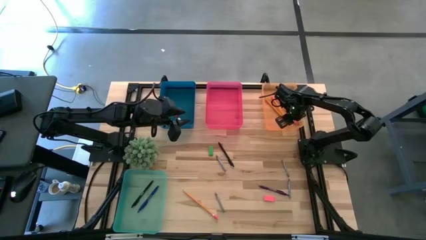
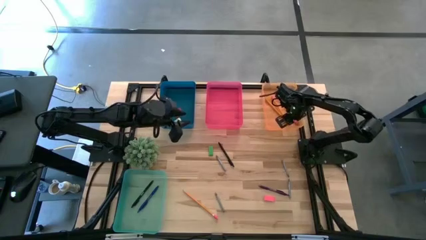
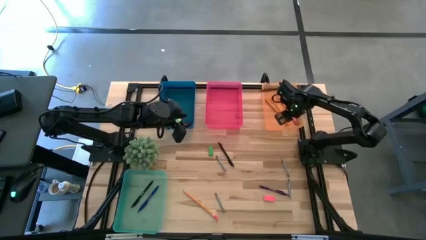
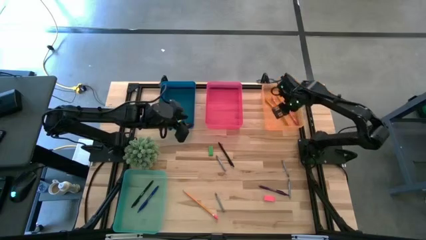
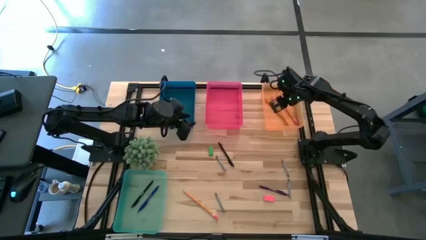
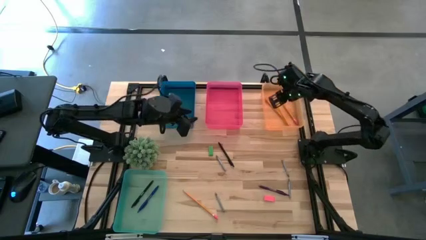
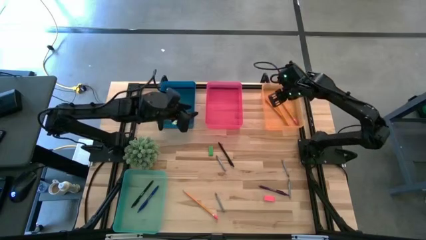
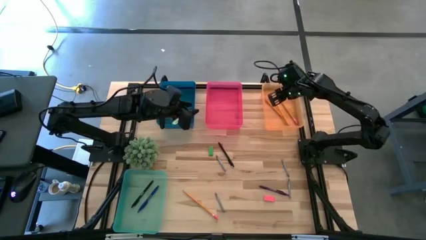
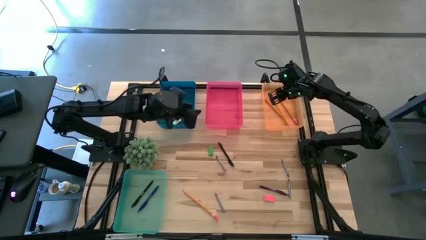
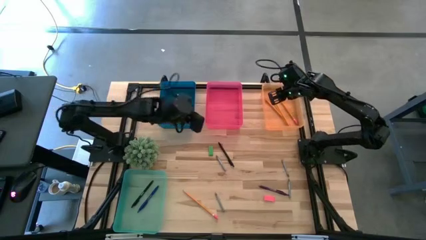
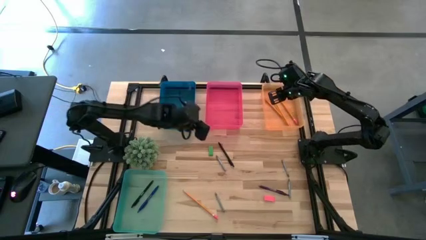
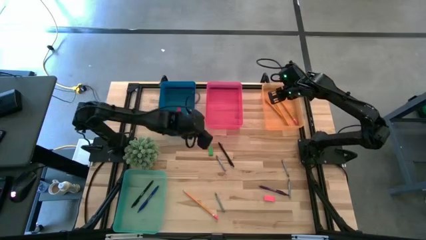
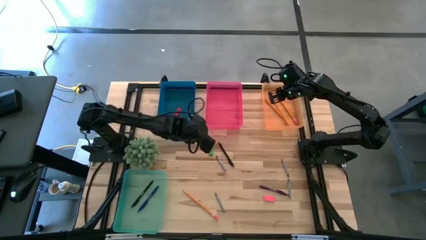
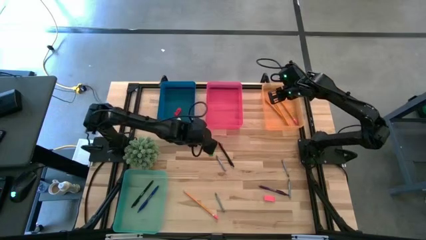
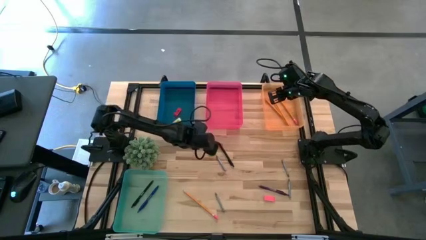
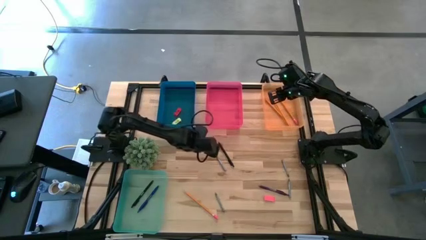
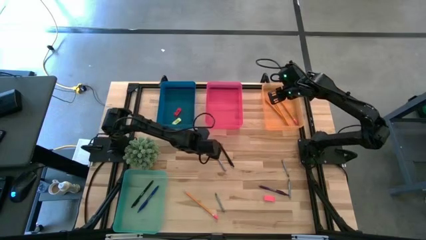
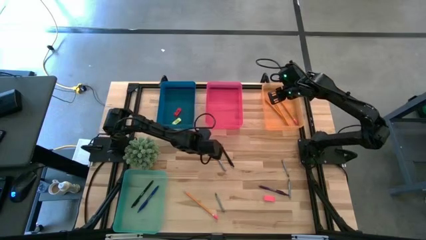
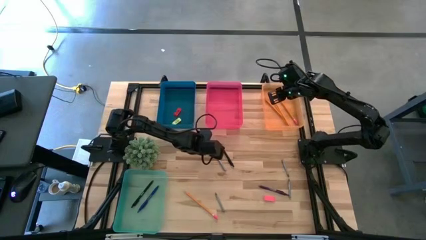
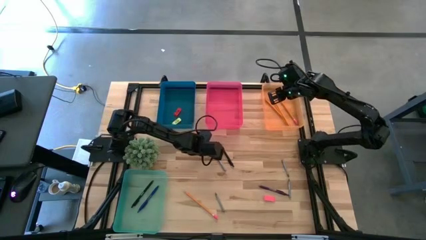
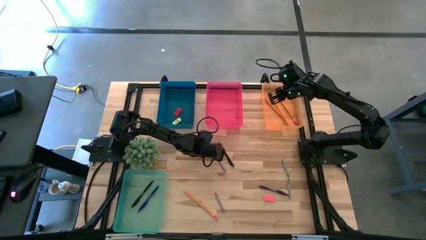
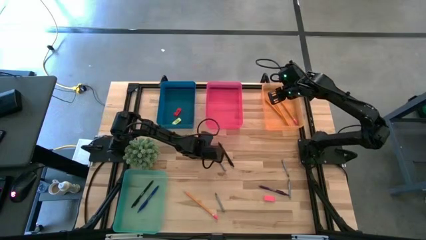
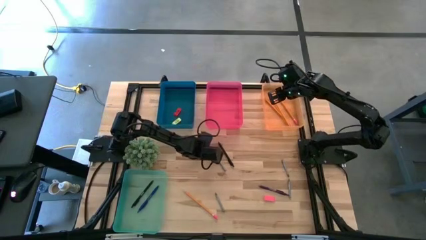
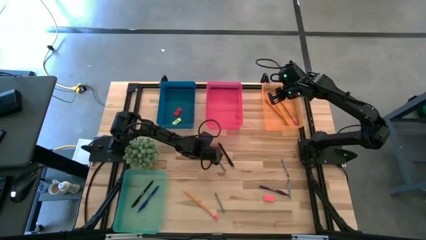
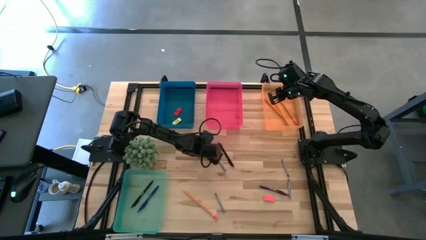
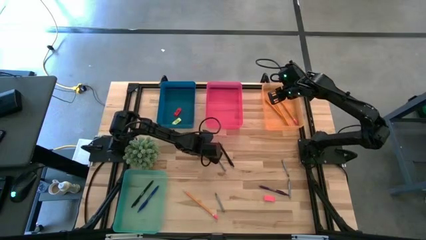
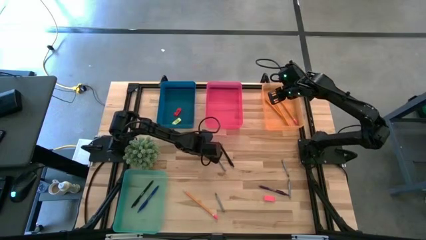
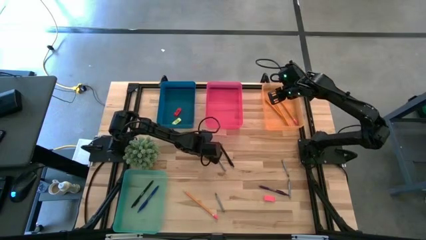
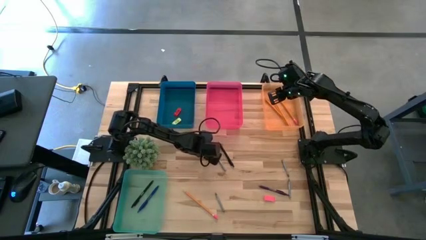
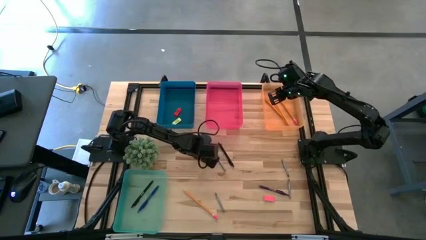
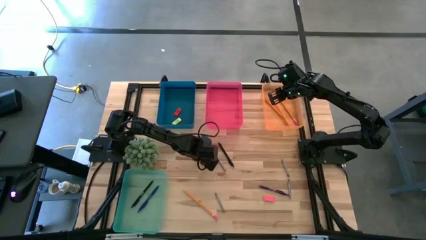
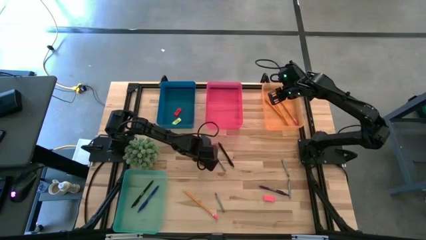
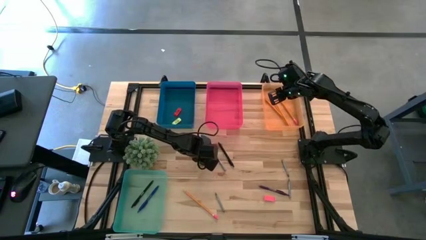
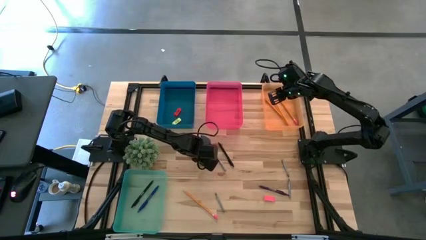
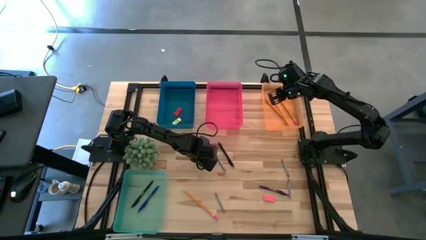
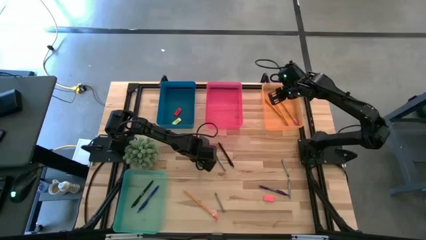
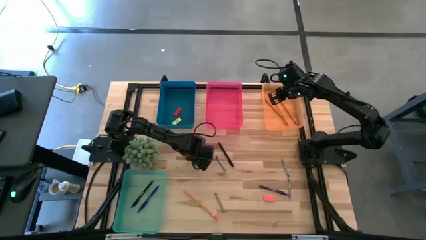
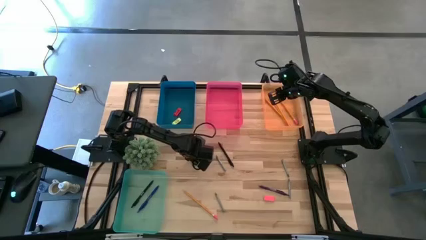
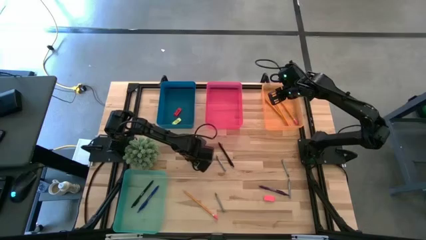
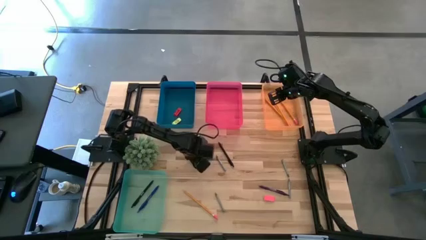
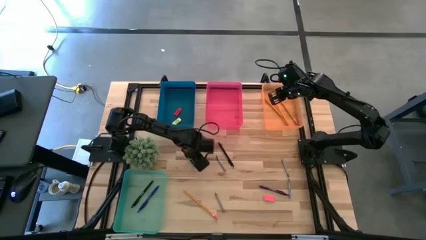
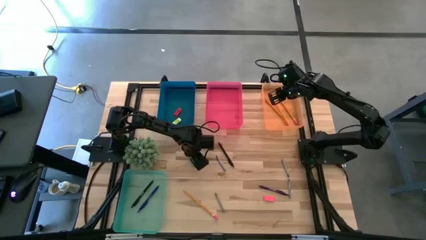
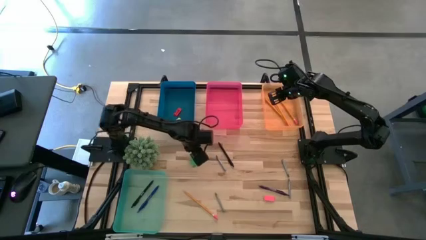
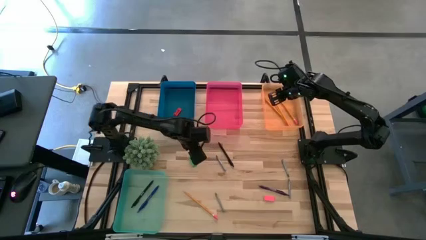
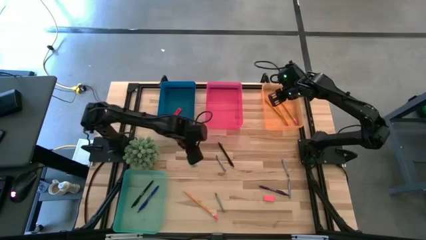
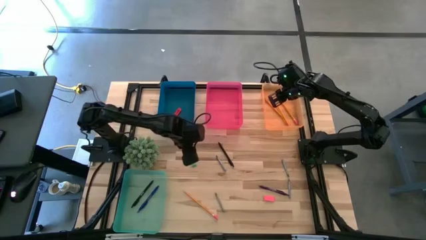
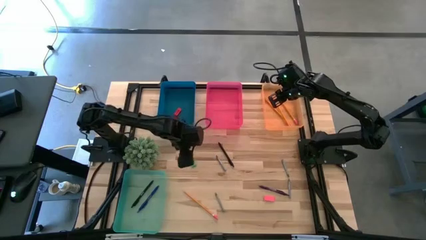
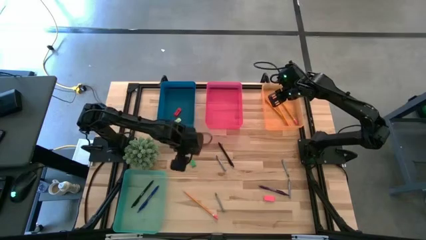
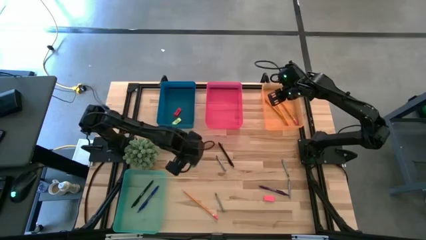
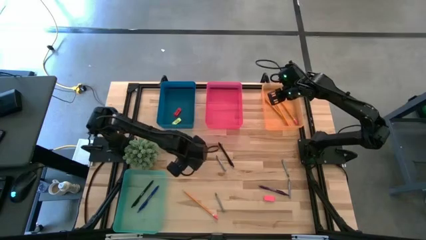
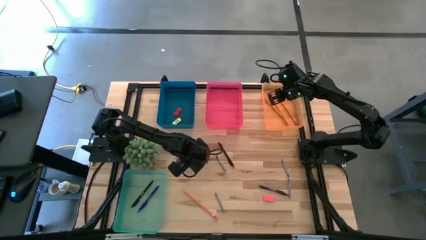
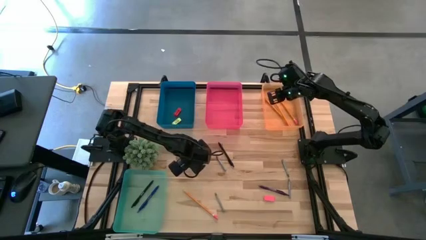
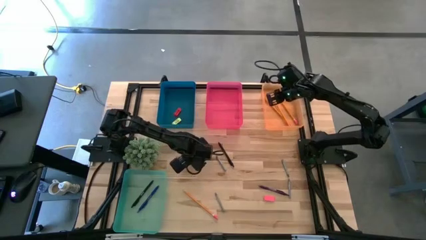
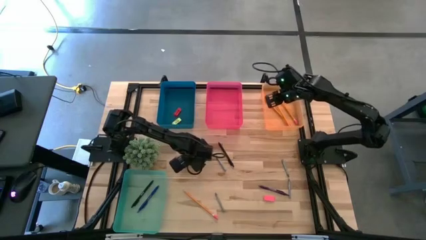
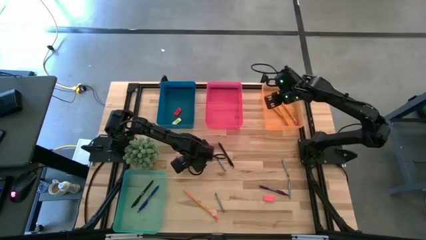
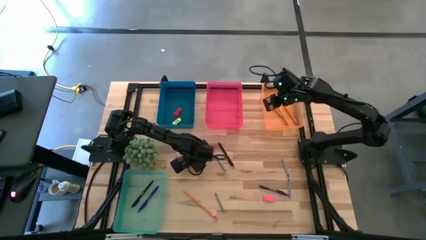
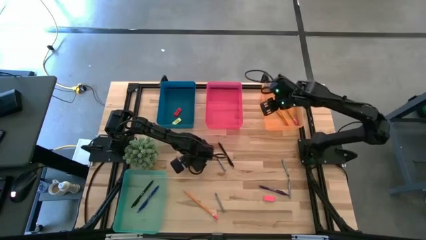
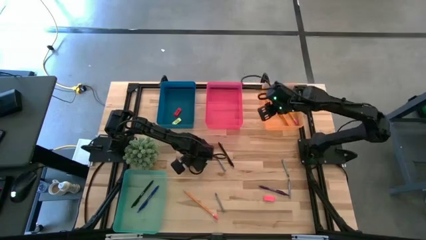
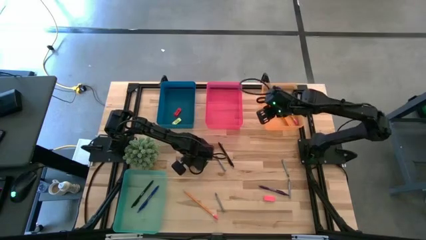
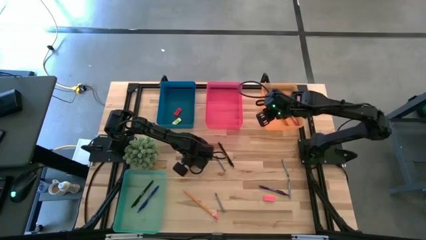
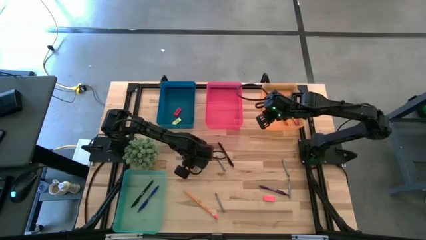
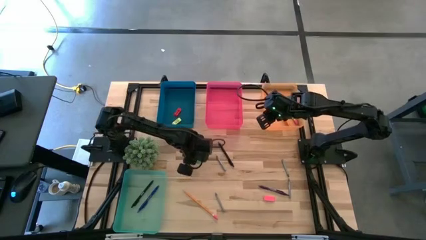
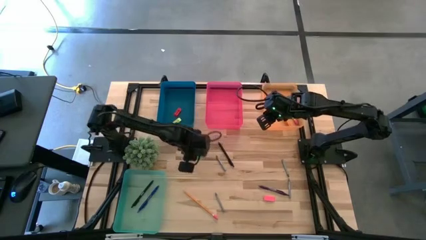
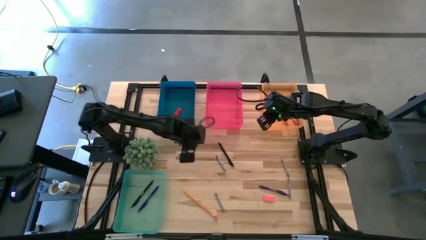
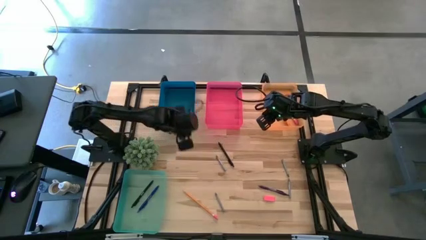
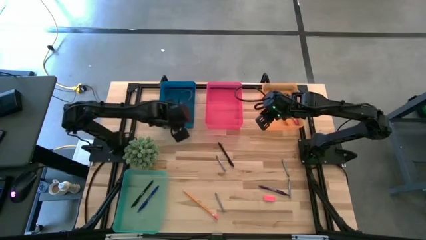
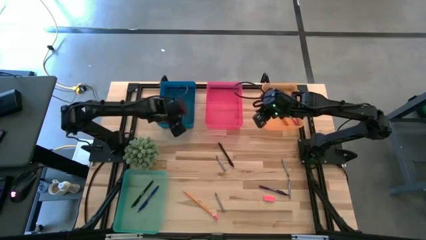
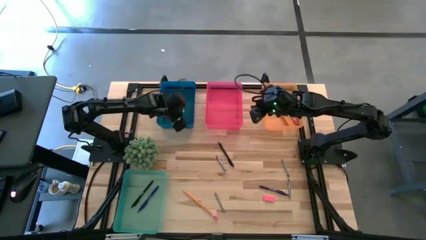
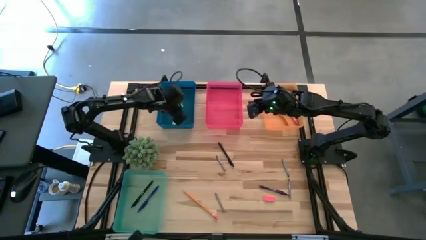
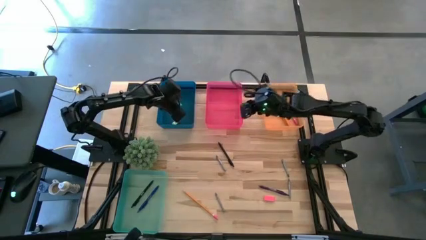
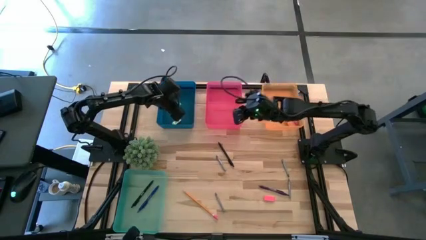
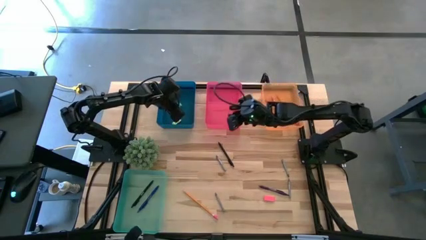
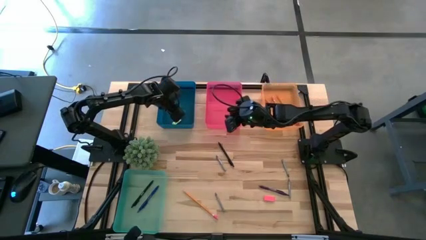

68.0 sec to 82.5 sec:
Task: Sort crayons/erasers/pens/pencils in bins
Put the green eraser into the transparent blue bin

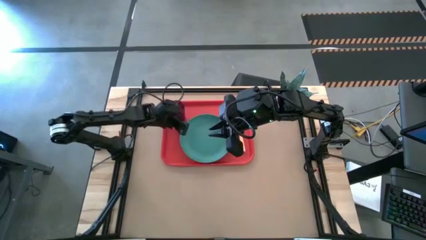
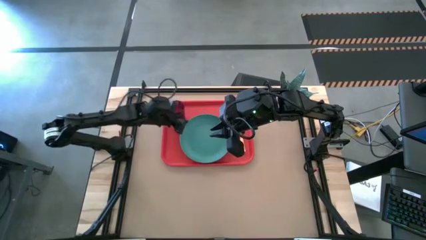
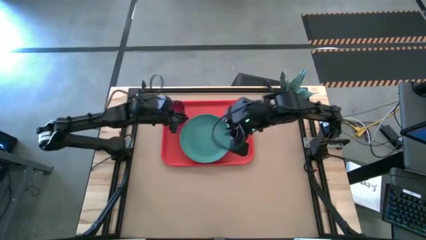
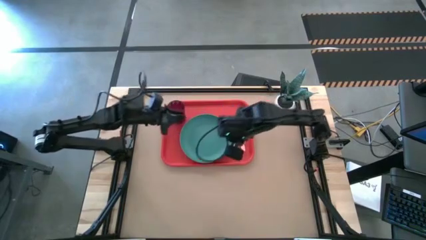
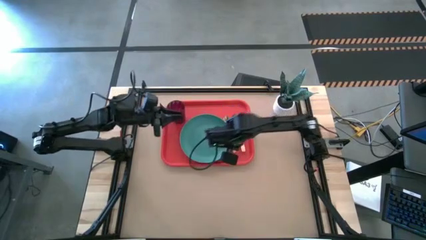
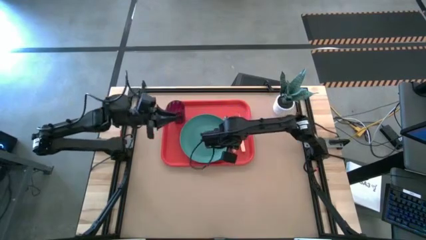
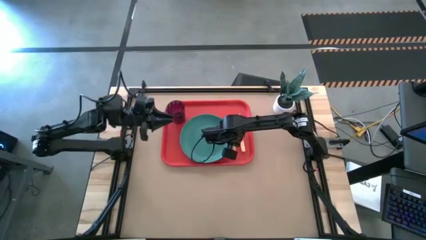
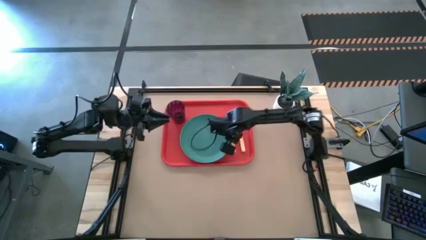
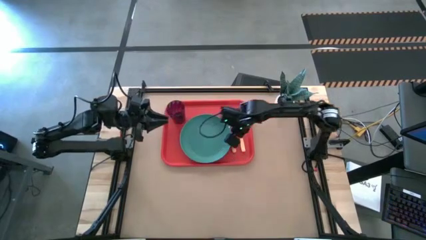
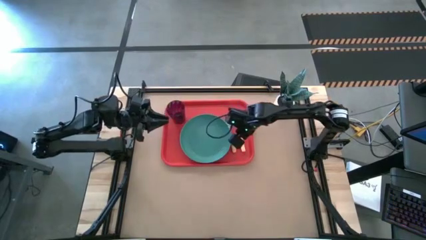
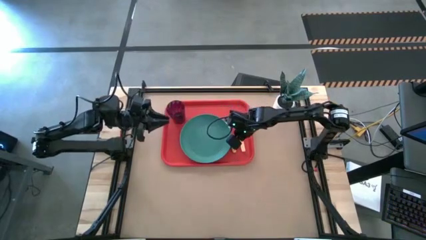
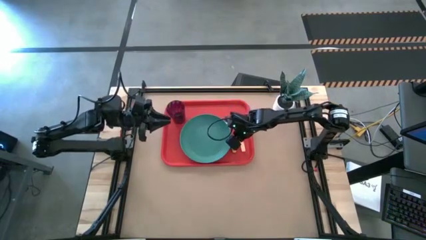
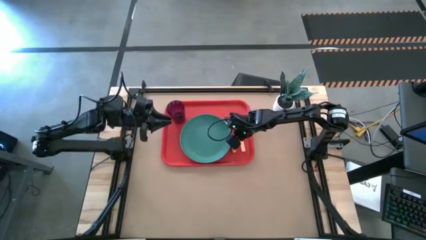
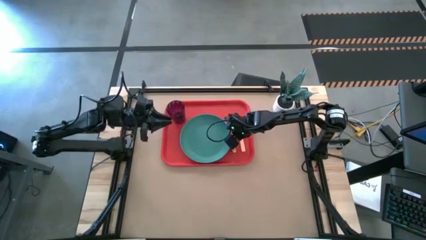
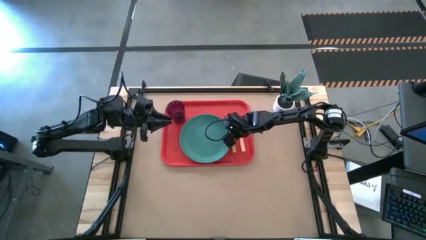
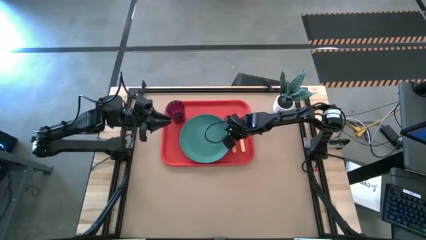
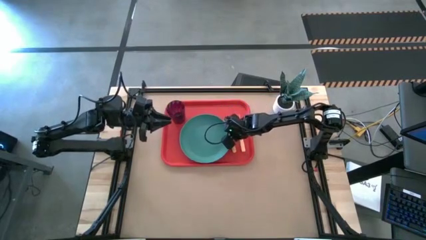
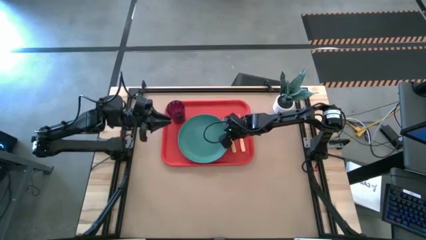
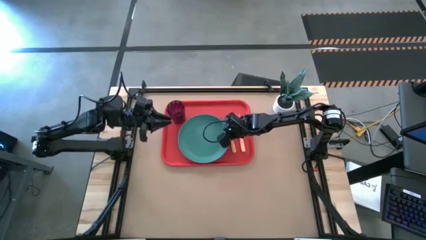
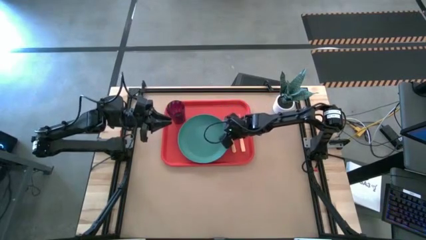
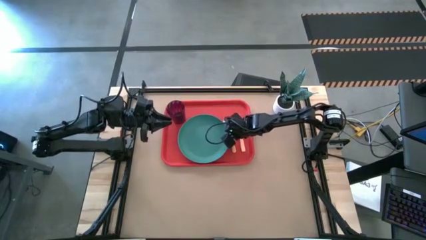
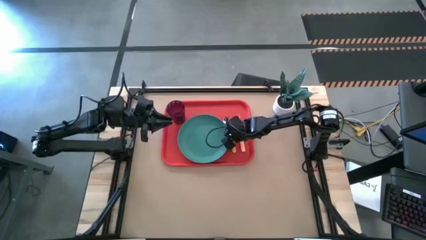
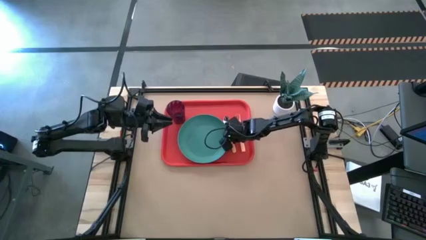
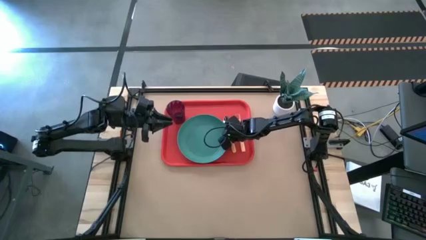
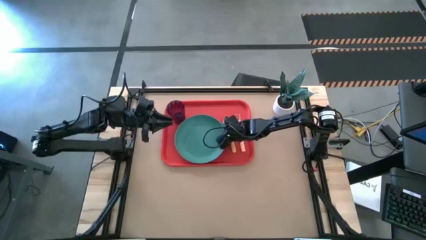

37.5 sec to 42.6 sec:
Task: Pick and place plate/cup/fork/spoon on tray
Adjust the green plate on the red tray
